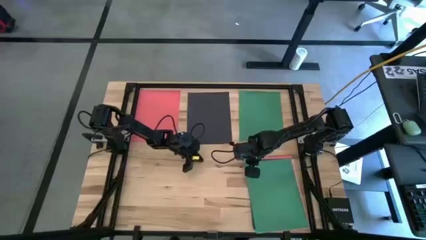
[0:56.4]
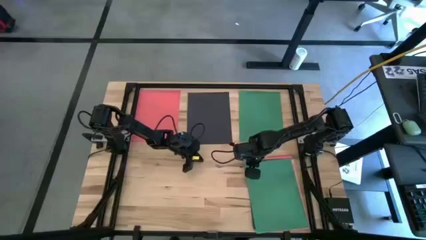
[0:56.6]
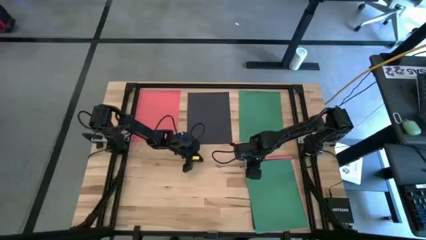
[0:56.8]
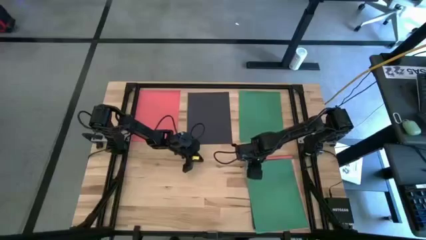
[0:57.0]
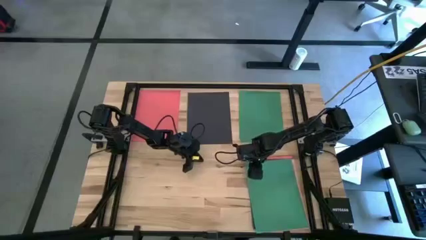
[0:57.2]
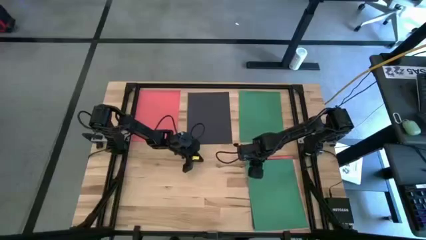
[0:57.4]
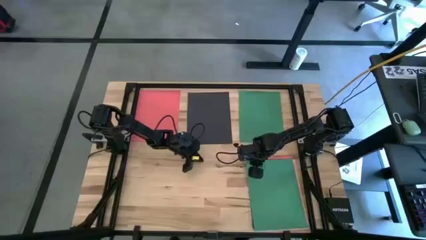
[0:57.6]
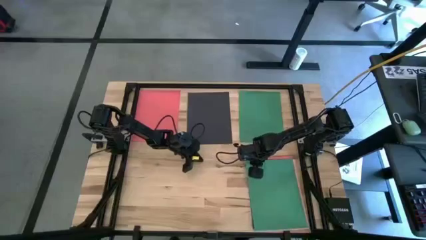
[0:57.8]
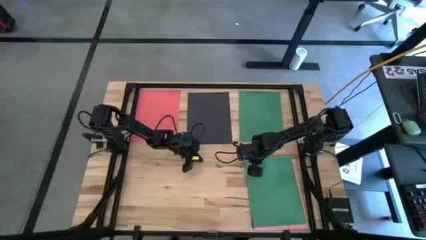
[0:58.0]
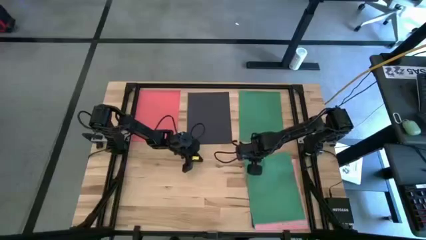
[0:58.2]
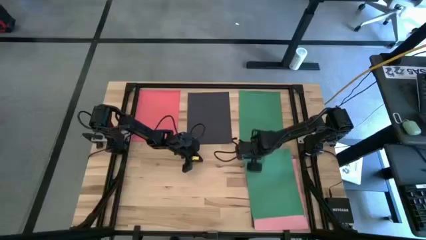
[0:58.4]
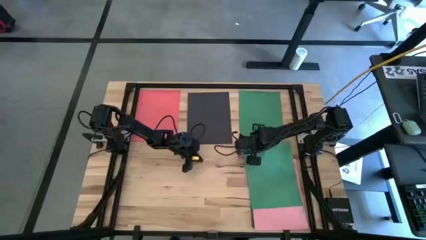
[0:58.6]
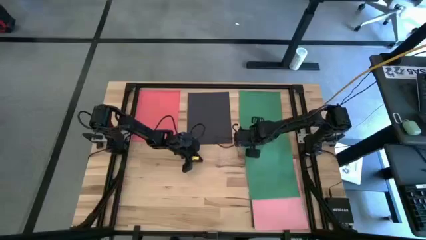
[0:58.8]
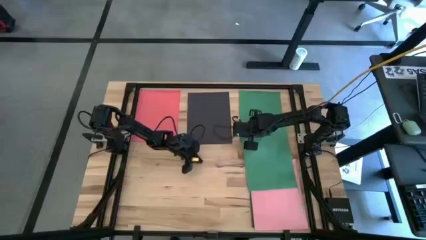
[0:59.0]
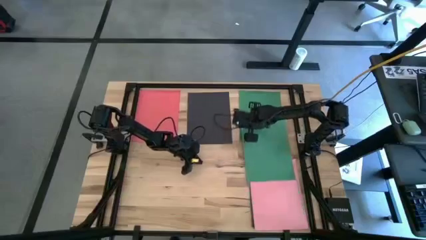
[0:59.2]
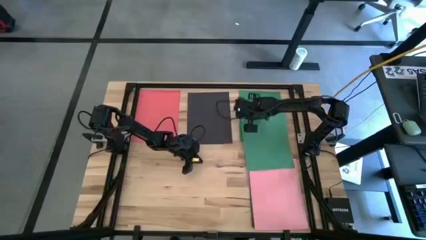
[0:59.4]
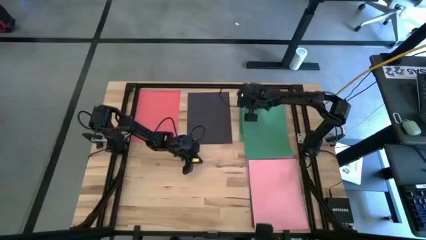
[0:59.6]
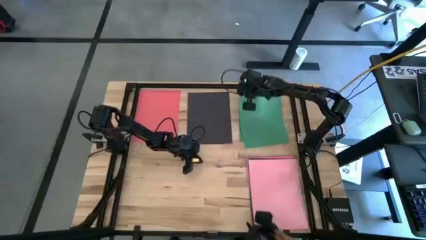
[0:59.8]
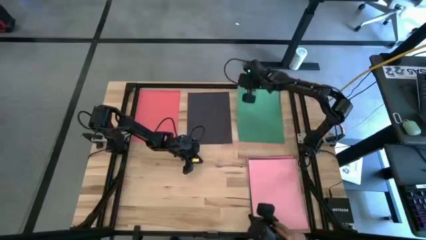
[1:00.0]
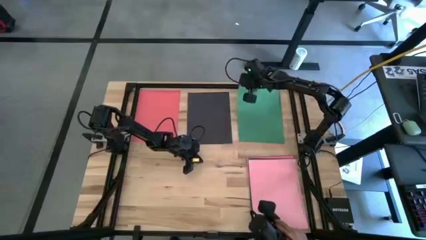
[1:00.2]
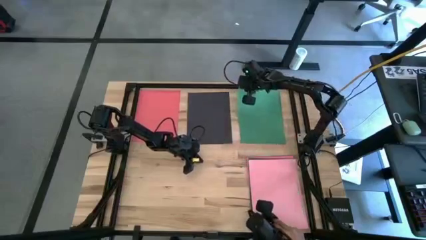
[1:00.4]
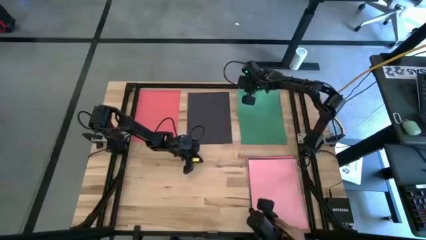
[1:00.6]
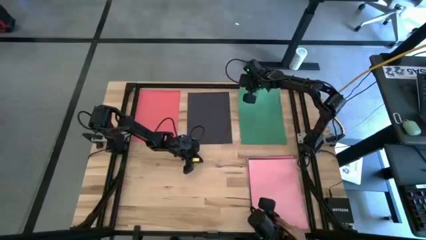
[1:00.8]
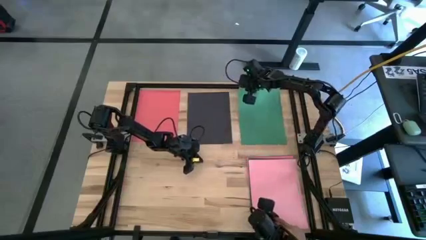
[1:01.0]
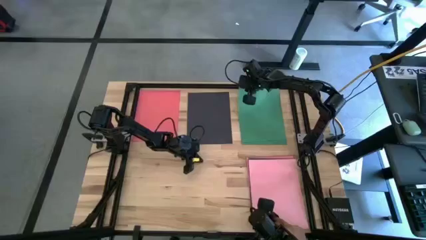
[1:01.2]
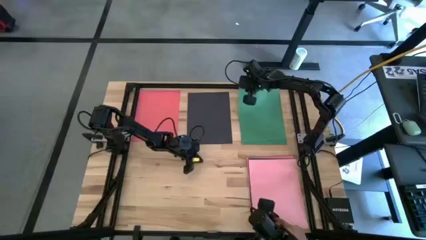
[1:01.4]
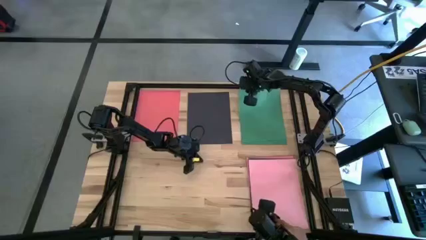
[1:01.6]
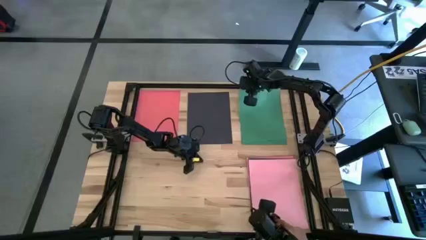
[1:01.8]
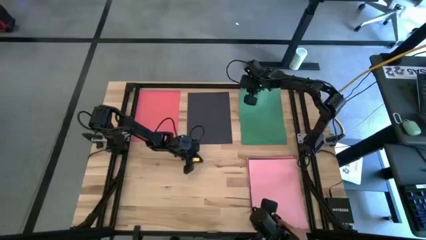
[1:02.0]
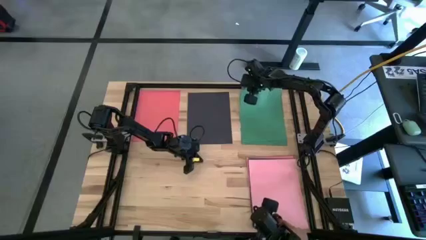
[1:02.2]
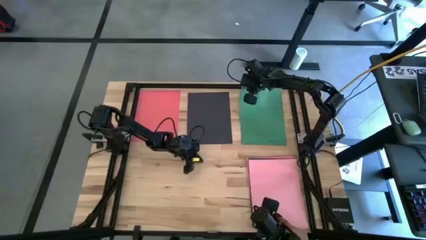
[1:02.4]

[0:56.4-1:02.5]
Task: Organize paper
Stack the green paper on the other green paper at the top right of the table

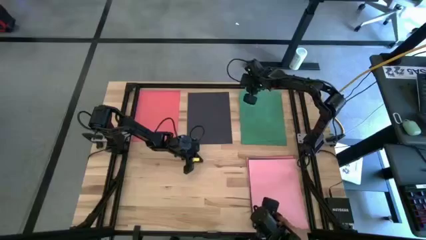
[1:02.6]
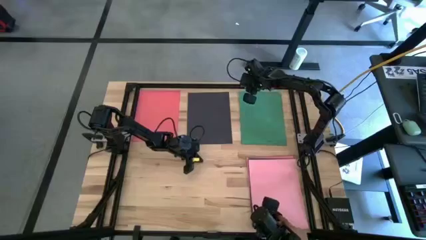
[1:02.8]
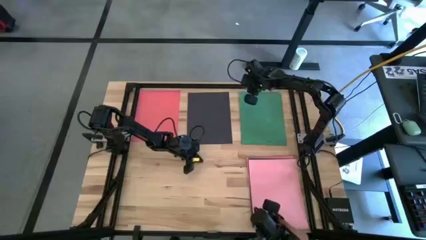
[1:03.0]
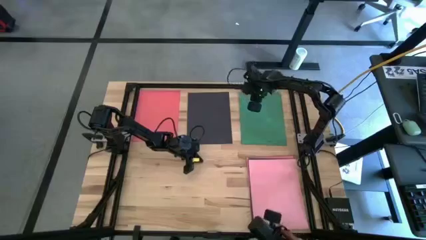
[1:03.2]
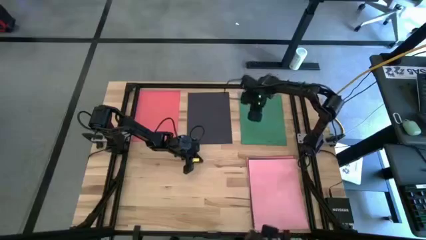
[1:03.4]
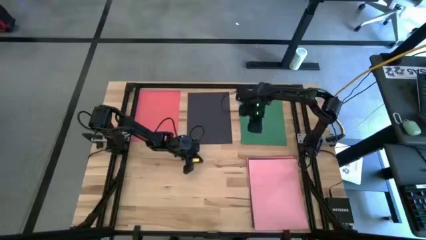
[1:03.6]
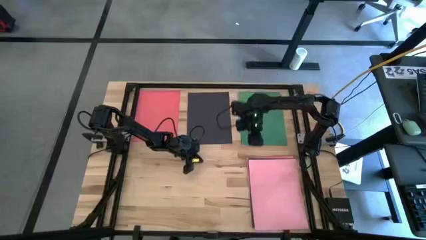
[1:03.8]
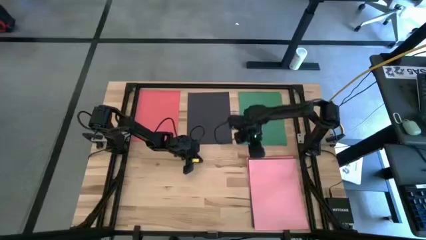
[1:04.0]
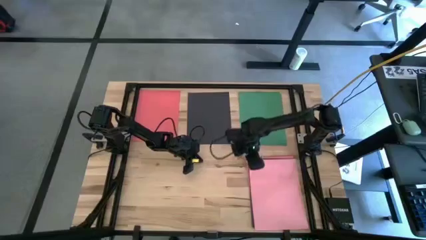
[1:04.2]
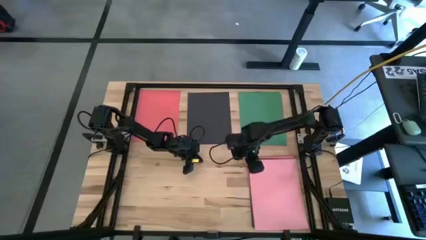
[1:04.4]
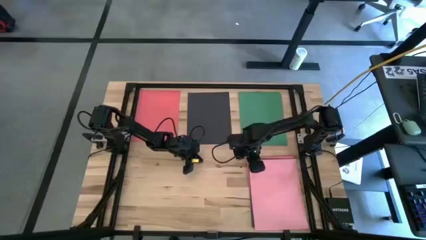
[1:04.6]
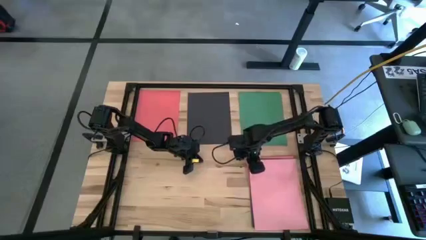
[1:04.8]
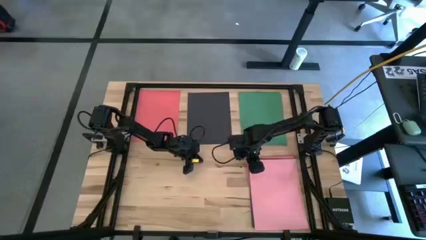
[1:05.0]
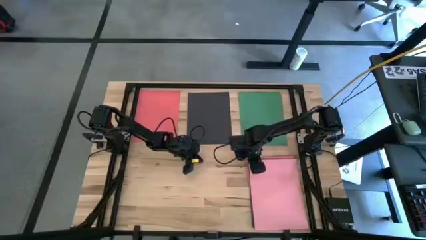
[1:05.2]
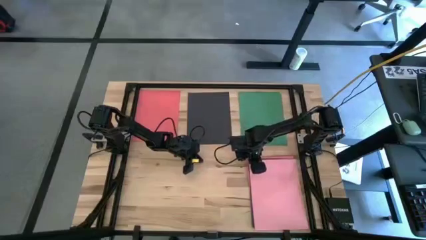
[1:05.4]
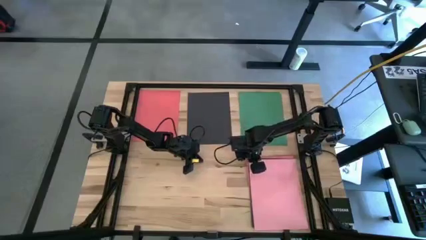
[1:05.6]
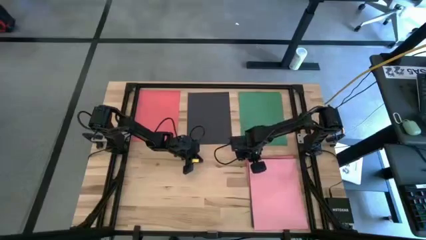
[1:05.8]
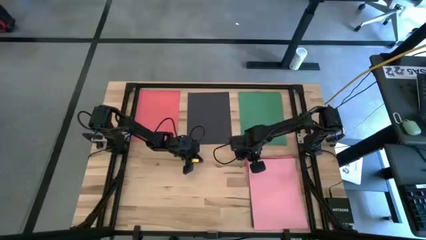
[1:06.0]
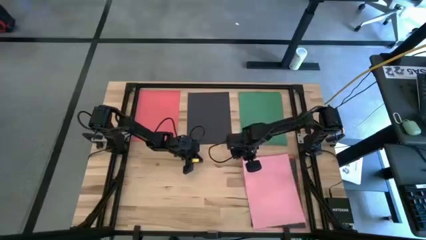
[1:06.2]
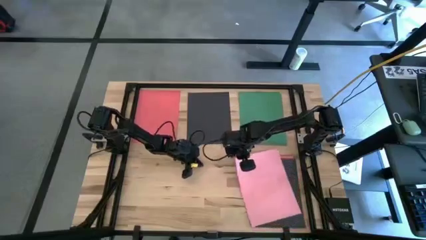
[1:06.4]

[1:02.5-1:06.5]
Move the pink paper to the bottom left of the table
